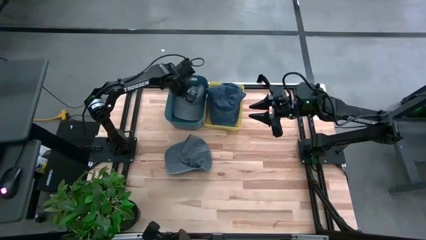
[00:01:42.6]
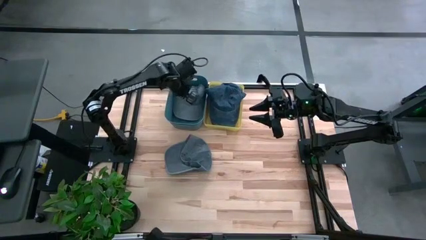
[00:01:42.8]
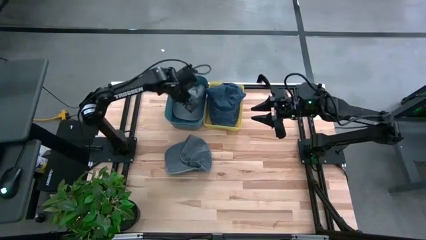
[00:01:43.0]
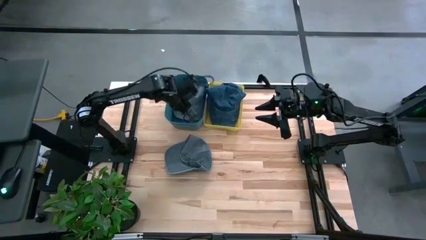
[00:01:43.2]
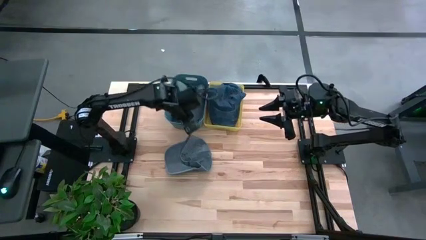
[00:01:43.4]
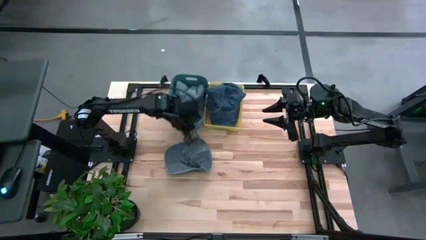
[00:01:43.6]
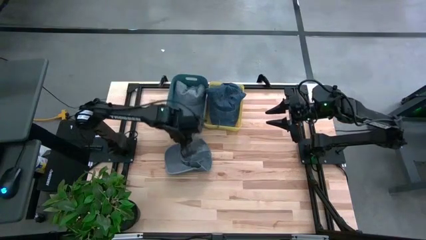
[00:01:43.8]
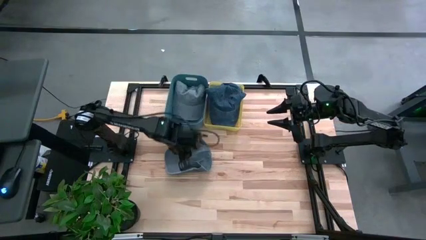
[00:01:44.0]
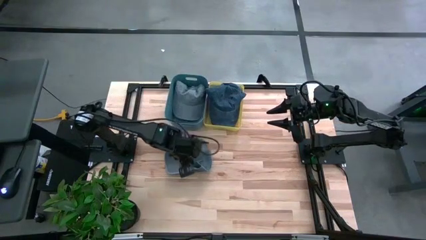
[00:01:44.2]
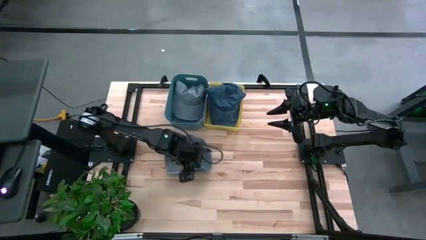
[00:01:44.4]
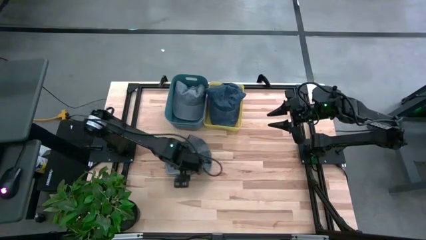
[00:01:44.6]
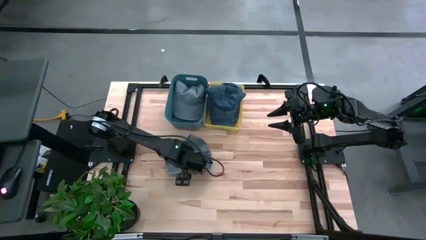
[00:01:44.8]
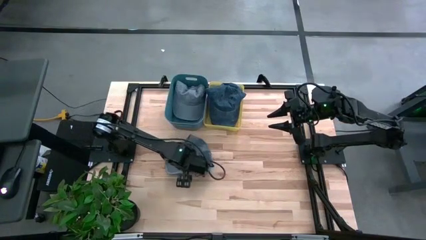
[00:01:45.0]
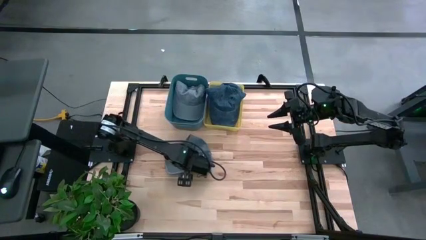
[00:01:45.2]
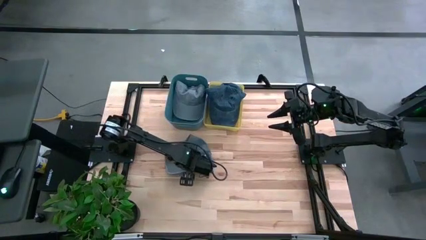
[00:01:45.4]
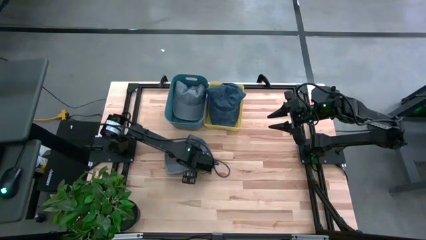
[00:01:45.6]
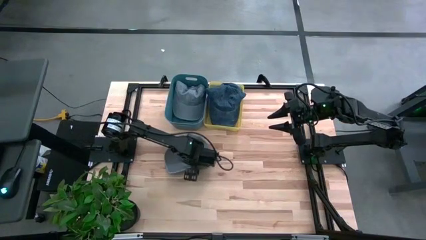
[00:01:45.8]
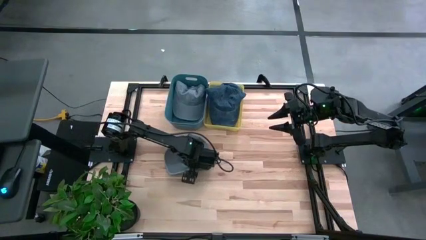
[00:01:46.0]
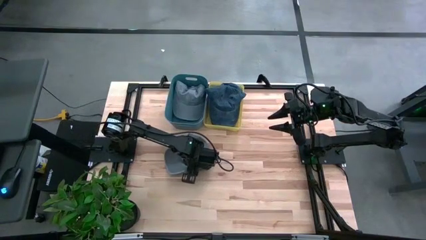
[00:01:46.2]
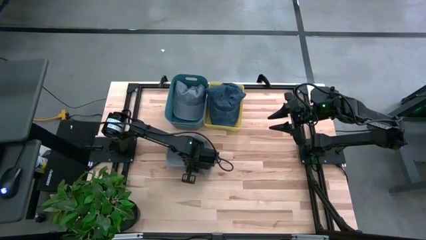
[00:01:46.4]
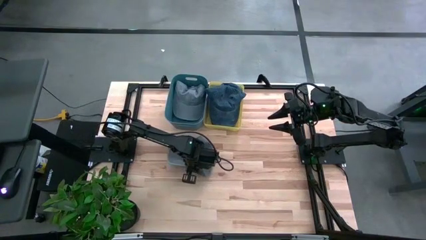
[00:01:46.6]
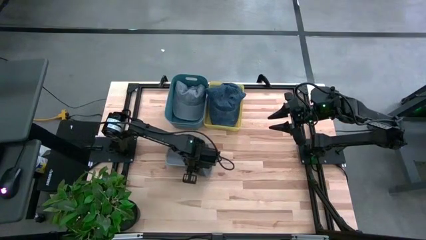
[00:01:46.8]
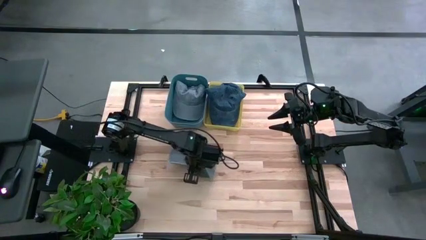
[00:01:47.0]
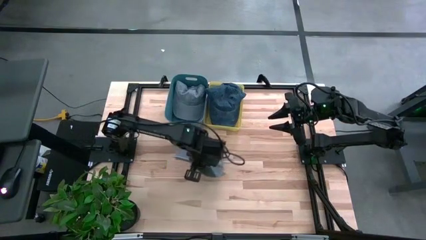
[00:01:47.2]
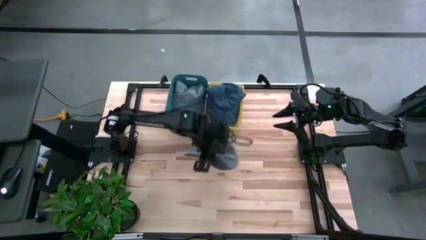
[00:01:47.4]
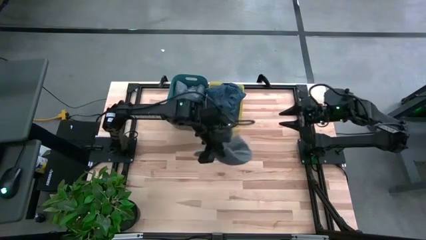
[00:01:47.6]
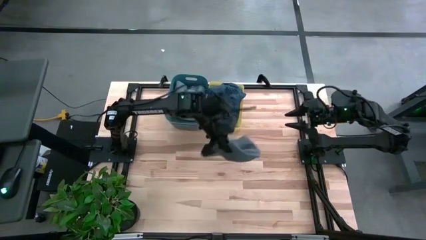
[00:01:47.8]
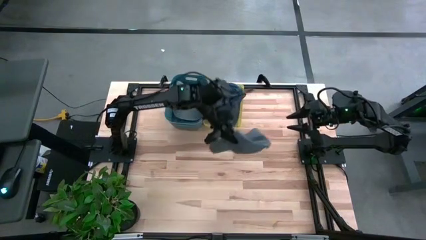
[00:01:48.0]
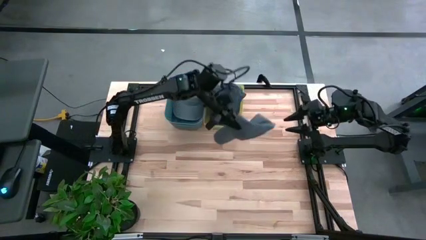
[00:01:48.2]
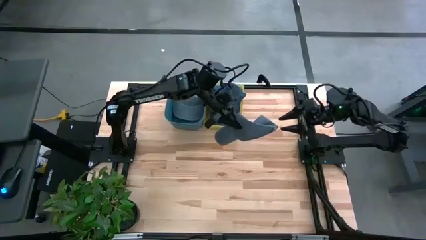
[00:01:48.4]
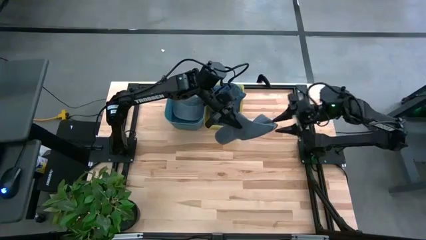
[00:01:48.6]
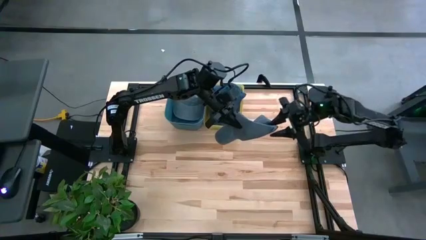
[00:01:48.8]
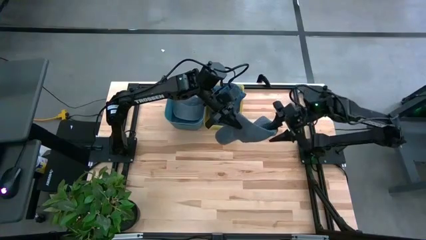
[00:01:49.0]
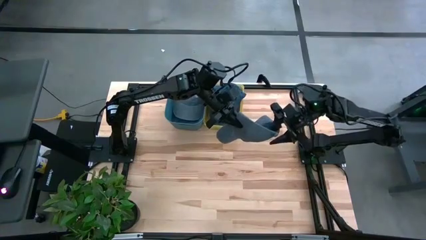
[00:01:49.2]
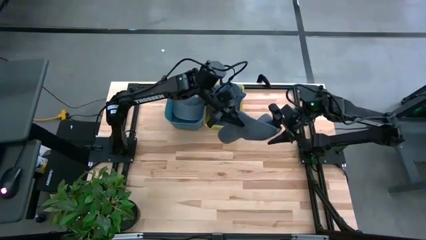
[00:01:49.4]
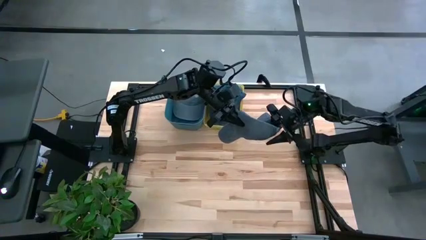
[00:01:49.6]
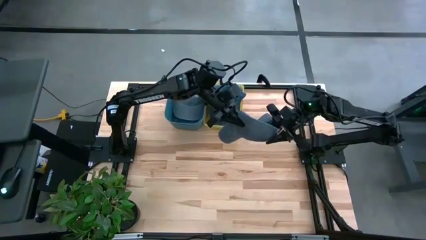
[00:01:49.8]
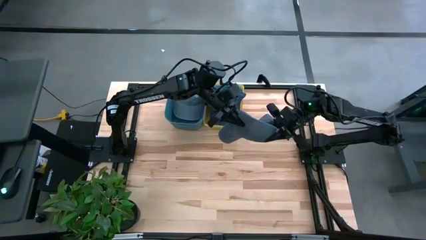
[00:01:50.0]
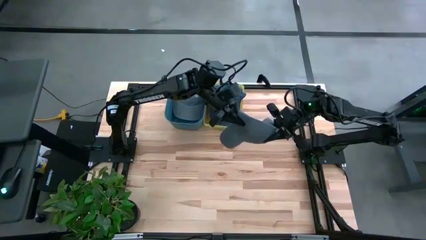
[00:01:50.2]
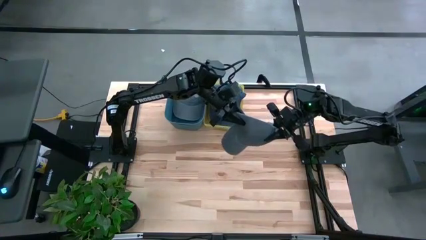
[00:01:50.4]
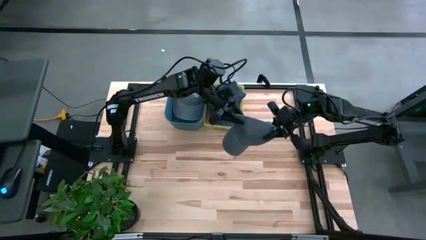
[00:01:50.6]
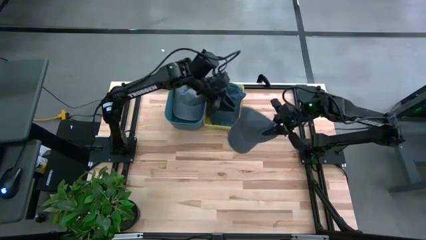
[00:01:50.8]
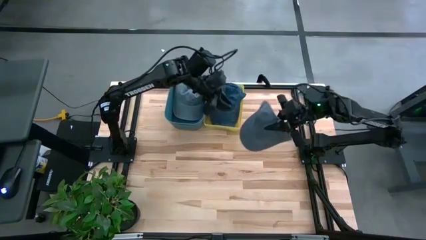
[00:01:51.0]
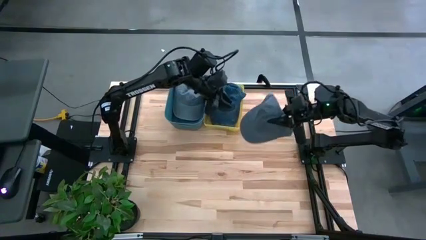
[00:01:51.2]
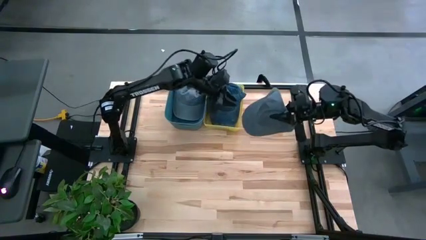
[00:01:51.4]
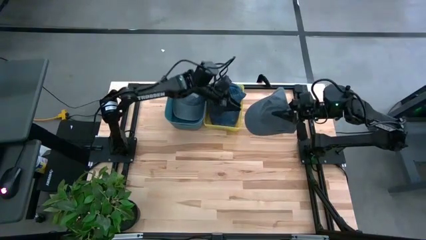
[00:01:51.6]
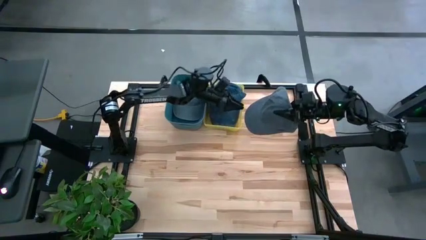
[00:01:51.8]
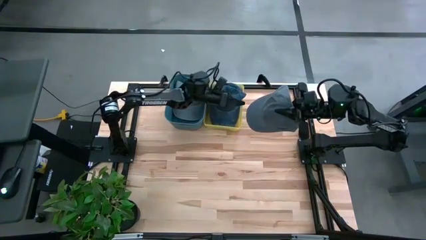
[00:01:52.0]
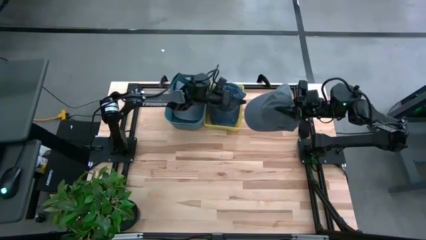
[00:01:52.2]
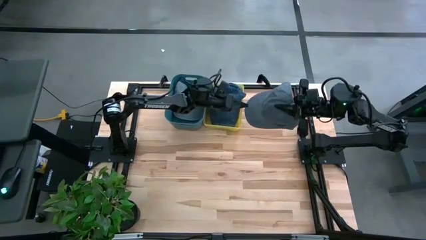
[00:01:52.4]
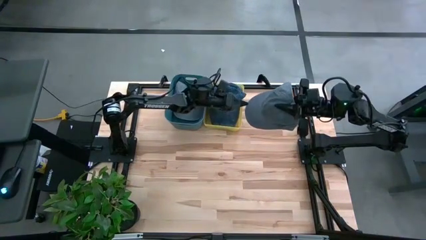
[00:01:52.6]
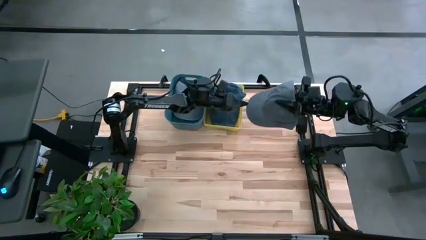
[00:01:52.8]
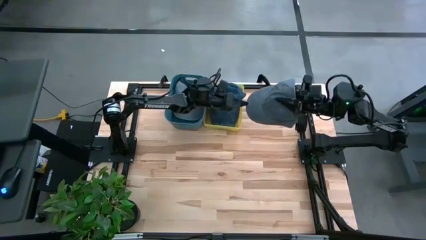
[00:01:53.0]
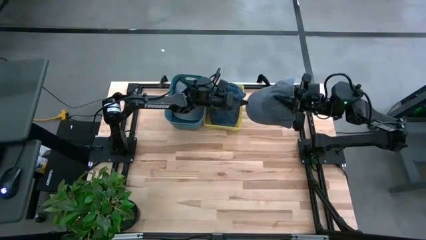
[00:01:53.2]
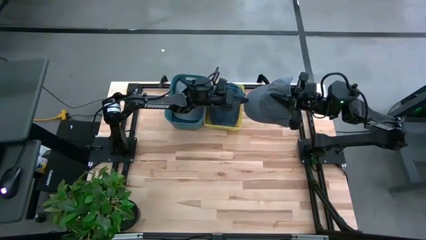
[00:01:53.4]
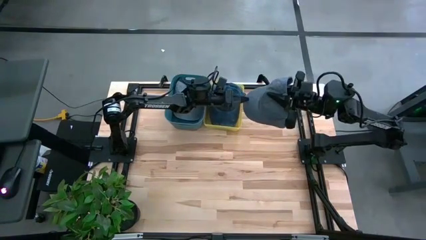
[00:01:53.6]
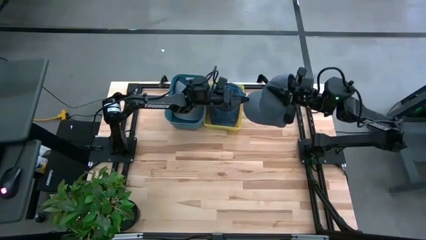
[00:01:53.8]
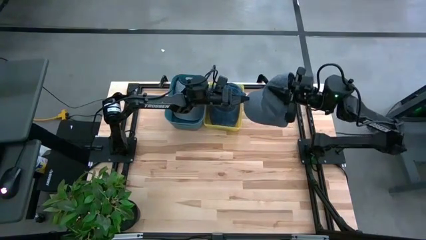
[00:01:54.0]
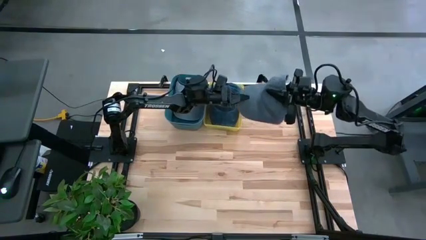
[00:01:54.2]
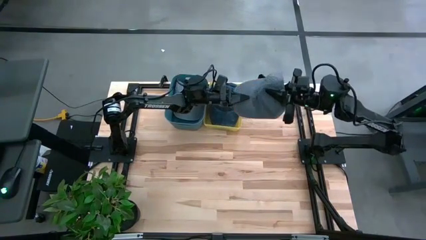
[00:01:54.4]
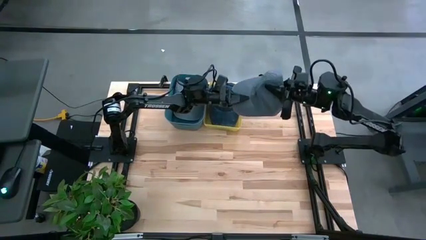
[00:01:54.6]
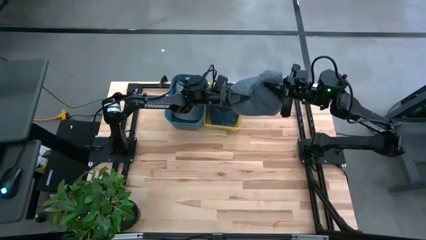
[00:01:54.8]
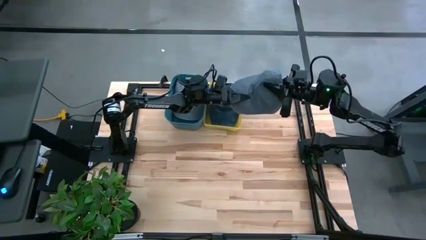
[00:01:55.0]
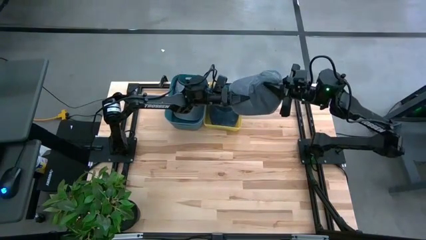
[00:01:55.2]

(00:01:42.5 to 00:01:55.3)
Task: Pick & Place hat
Put the gray cap into the blue bin
